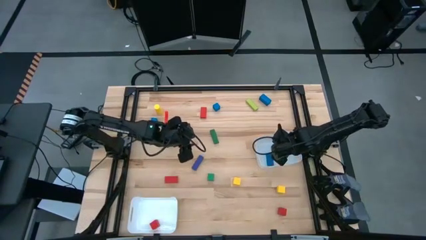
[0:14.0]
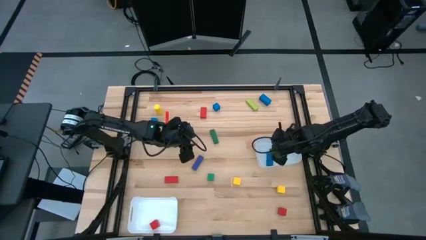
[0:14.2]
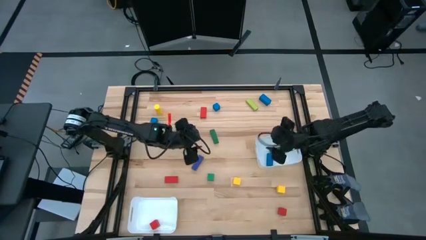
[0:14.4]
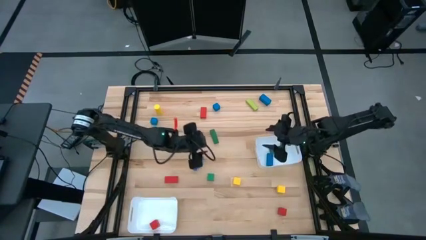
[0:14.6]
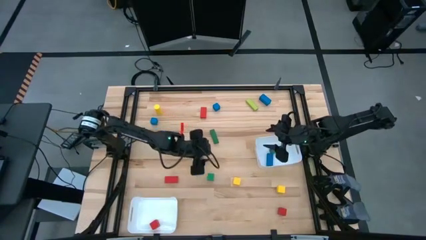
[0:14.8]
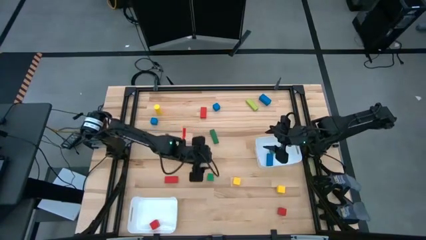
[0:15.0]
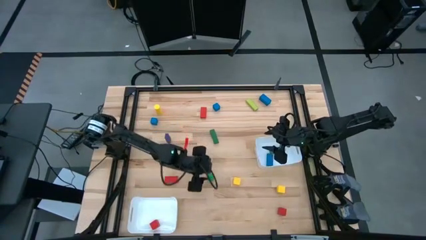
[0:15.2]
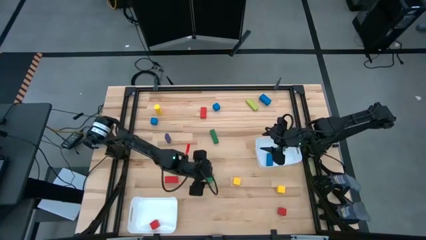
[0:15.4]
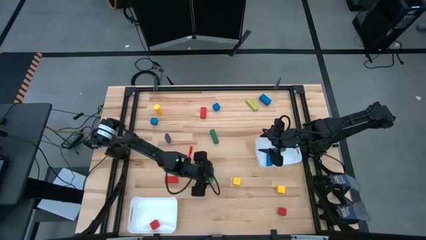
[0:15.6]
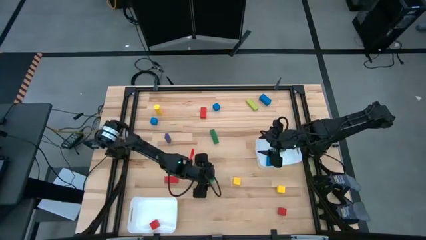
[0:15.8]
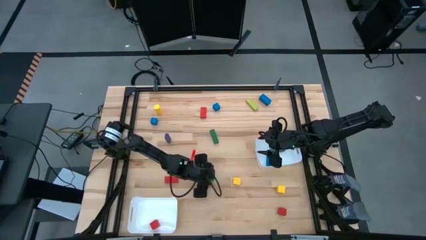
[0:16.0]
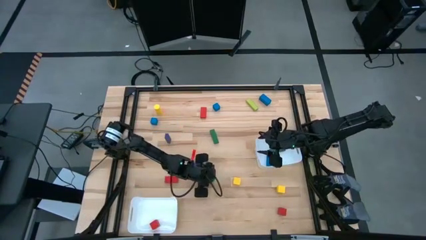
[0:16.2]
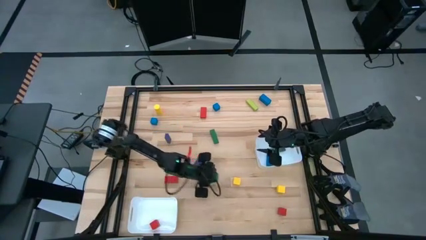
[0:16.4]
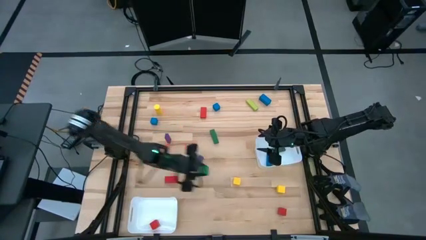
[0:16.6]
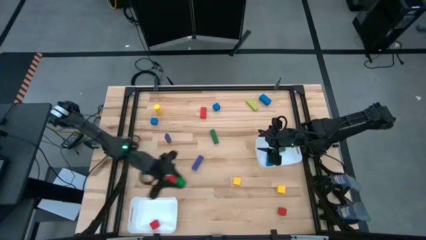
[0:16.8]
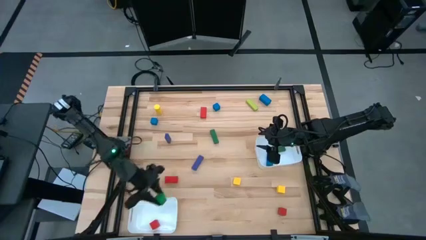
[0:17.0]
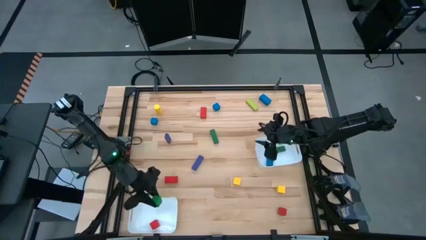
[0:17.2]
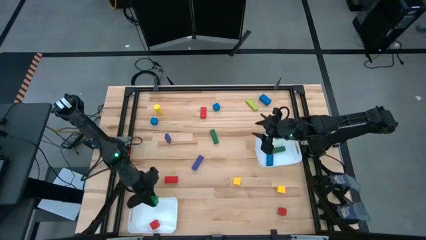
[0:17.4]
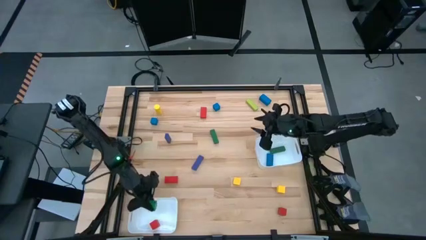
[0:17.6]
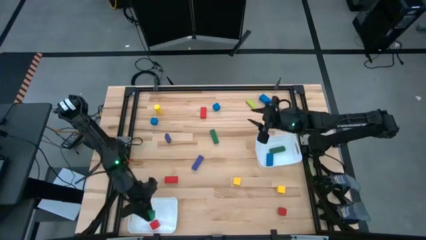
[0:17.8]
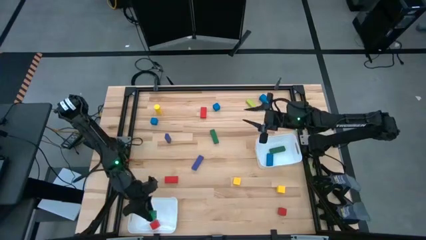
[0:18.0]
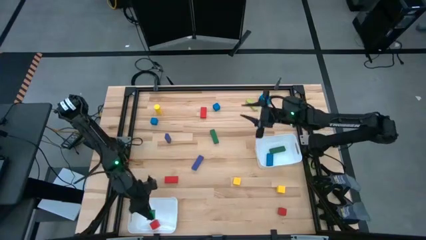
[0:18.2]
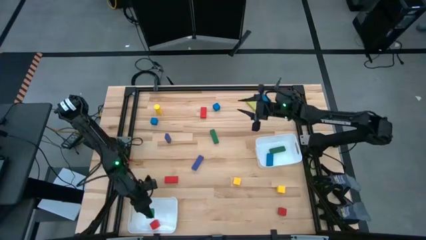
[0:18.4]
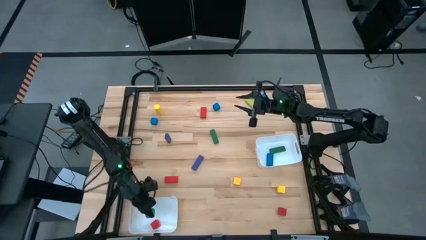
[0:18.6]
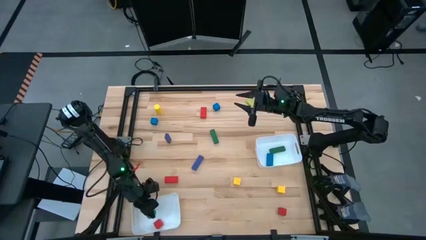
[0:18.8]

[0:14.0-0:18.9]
Task: Sort blocks by size
Put the green square block into the bottom white bin

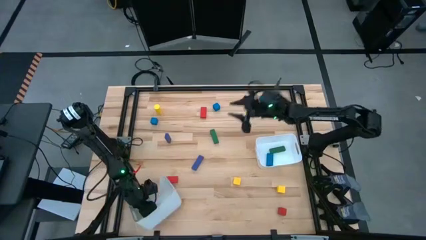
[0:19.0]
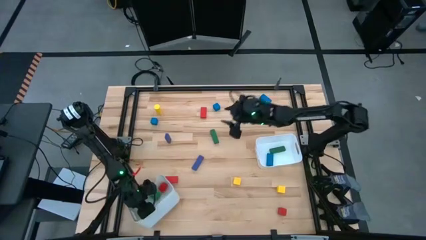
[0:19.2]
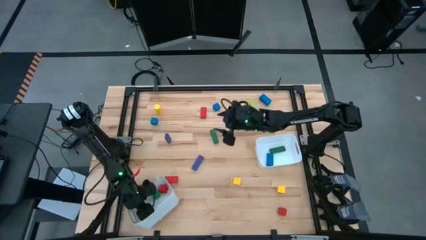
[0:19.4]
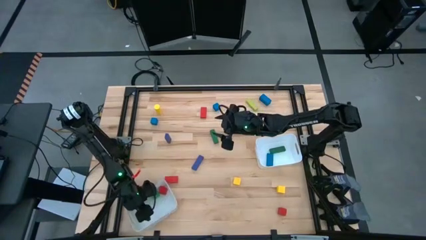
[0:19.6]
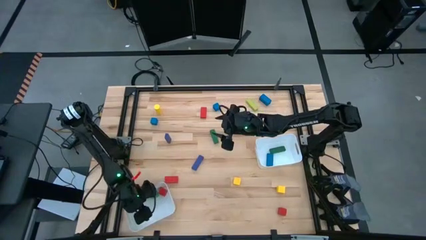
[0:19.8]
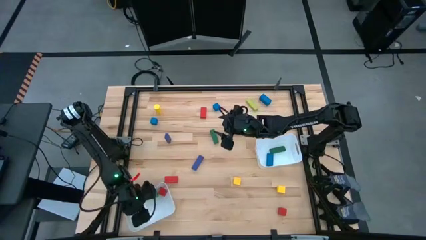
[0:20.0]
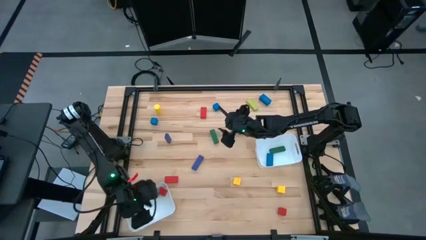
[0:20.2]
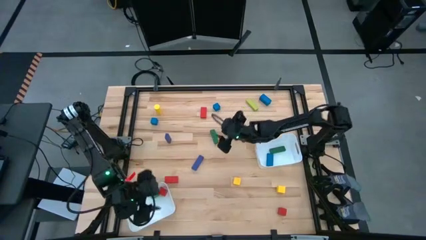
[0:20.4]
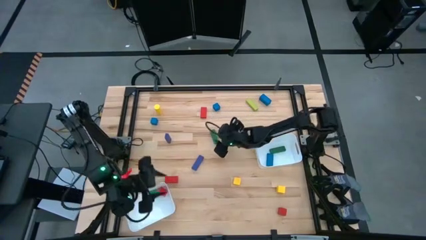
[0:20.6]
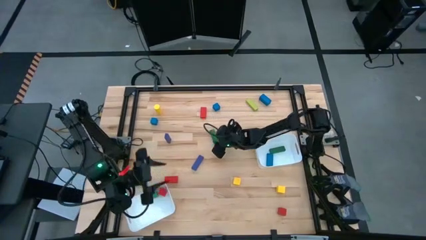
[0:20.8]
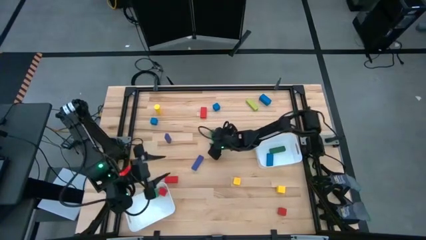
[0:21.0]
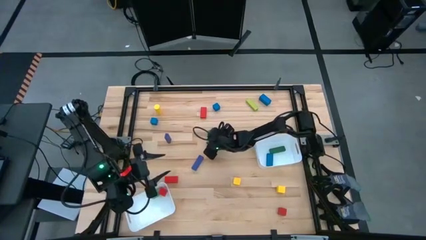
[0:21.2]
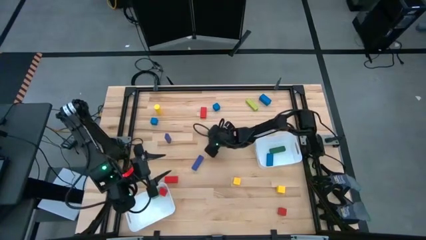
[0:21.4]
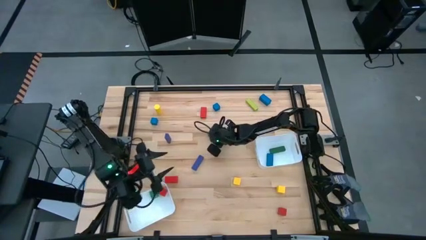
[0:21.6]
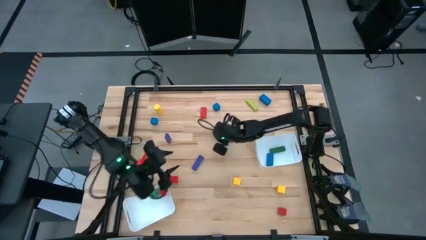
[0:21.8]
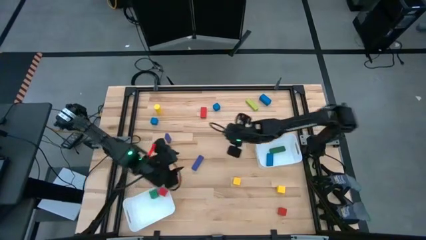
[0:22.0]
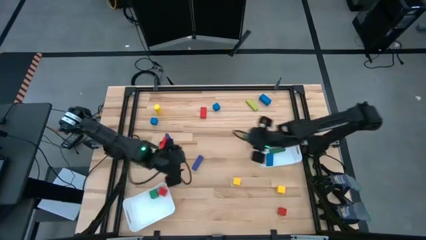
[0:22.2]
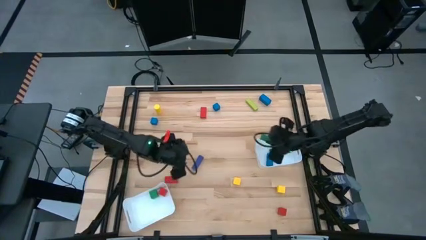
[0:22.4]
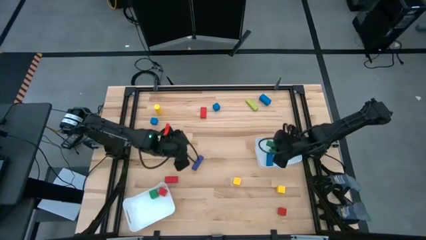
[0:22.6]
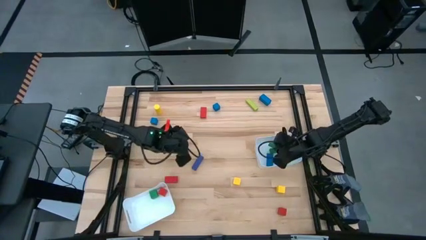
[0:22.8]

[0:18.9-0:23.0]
Put the green rectangular block into the top white bin

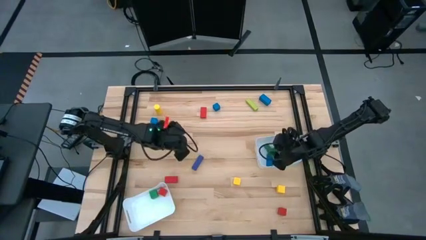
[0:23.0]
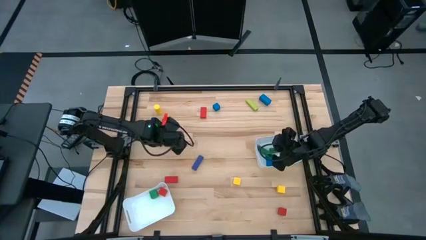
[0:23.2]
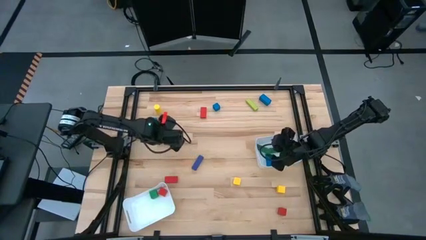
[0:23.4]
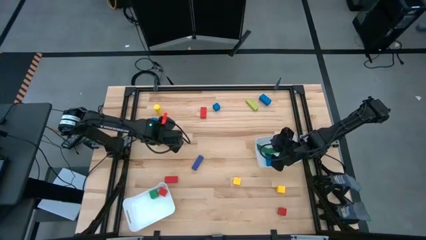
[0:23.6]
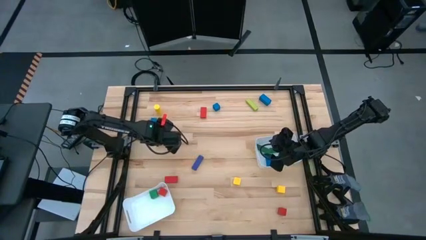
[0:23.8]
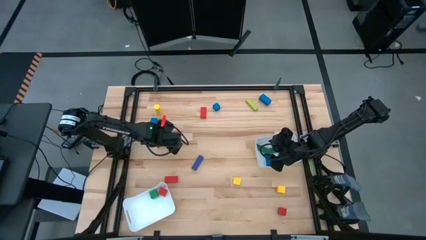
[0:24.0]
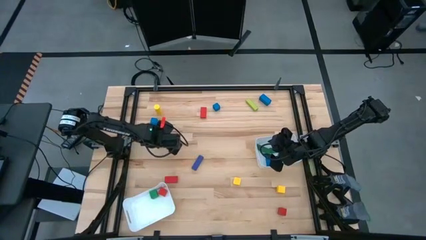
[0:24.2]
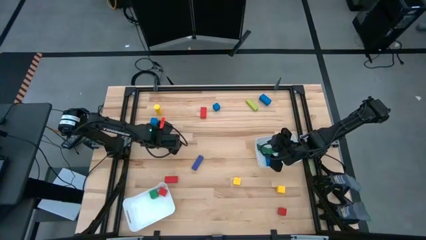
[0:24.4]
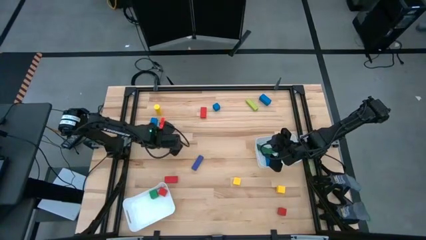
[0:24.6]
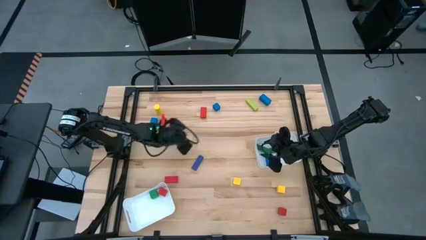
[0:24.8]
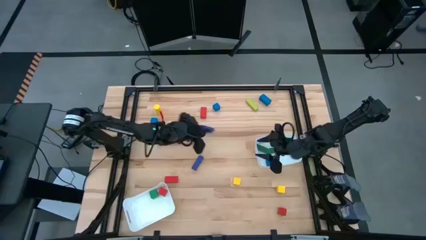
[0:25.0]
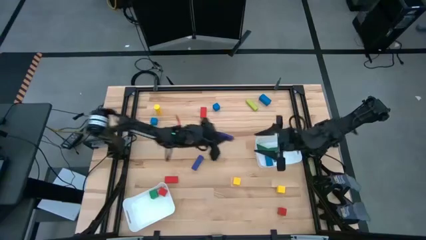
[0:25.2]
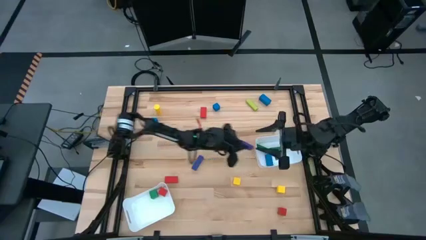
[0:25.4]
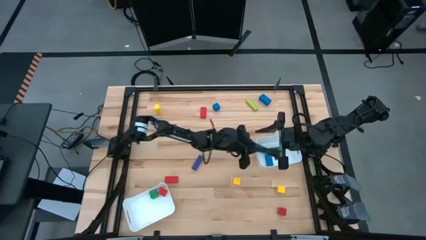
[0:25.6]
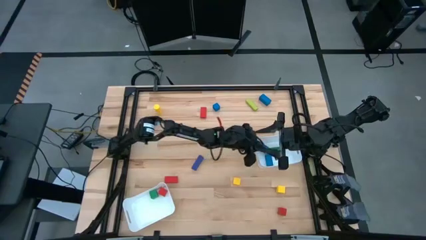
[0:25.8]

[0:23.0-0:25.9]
Put the blue rectangular block into the top white bin

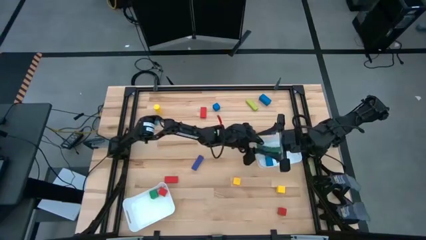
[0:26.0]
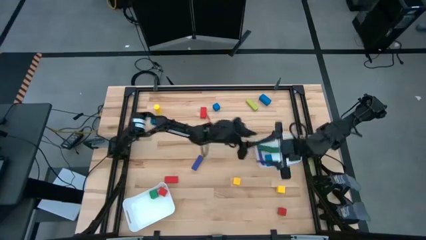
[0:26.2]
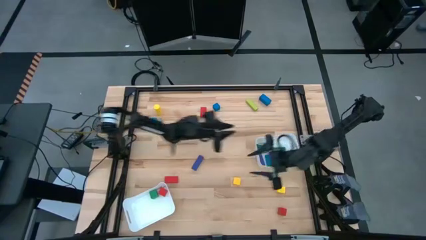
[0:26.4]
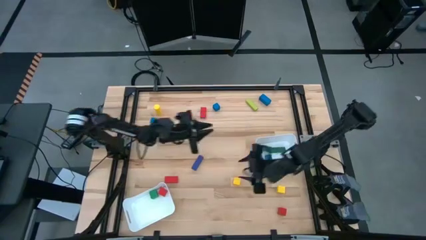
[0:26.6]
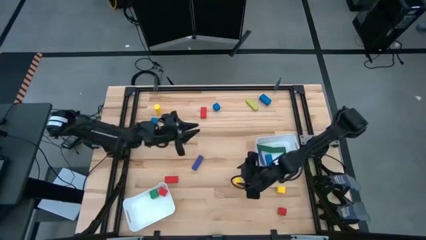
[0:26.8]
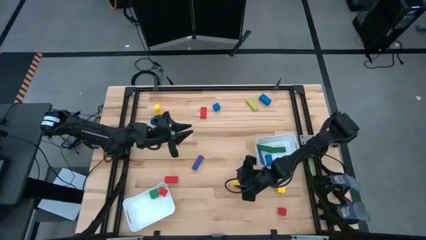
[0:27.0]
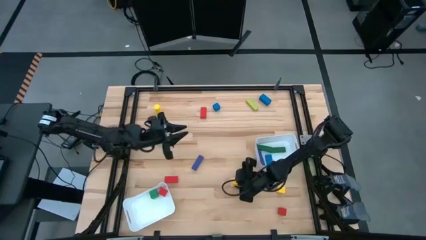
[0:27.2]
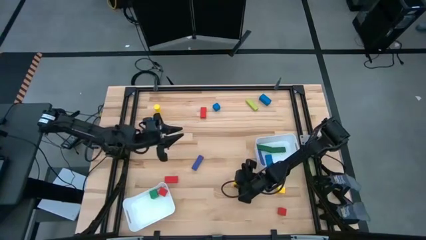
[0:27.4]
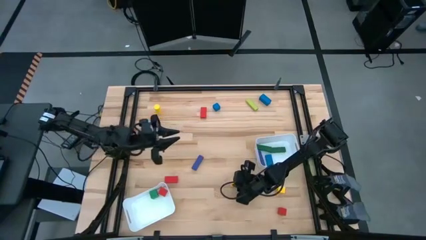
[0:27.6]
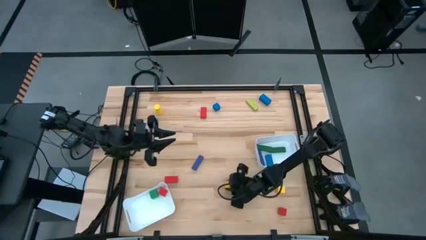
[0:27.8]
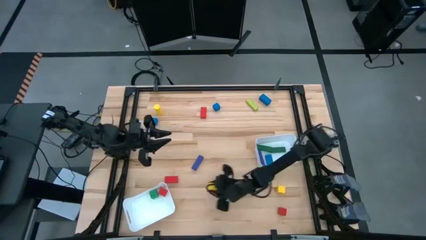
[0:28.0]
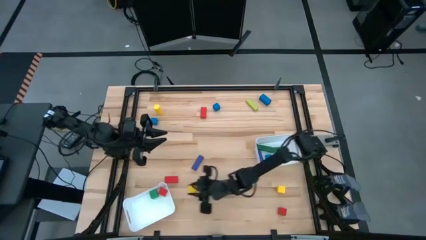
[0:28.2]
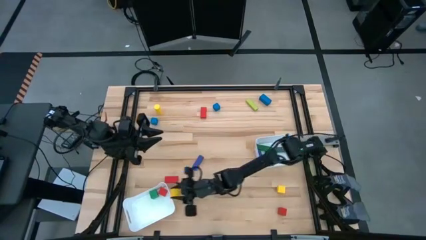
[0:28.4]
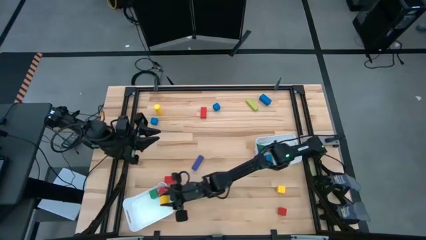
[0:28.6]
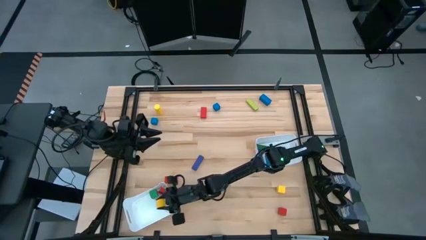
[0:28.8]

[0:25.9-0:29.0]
Put the yellow square block into the bottom white bin

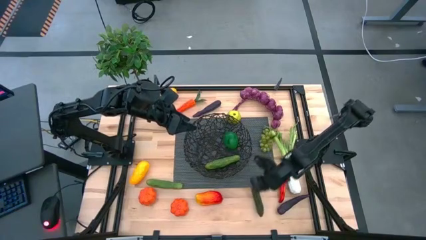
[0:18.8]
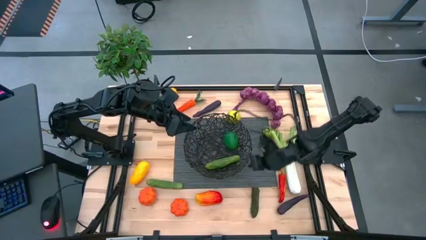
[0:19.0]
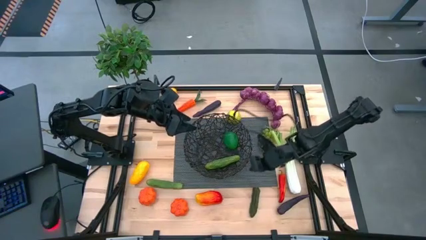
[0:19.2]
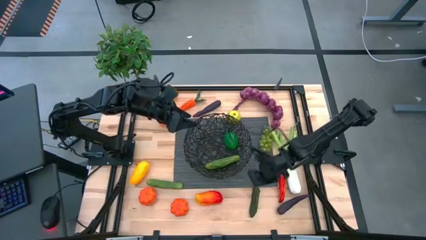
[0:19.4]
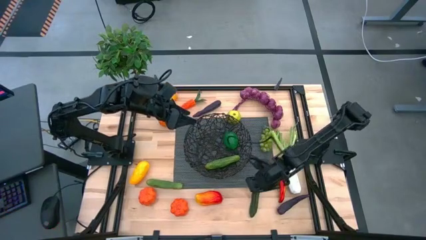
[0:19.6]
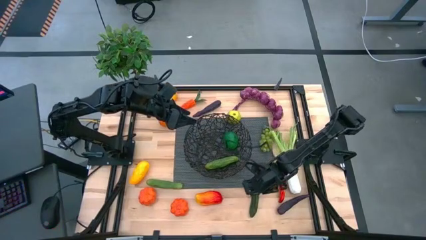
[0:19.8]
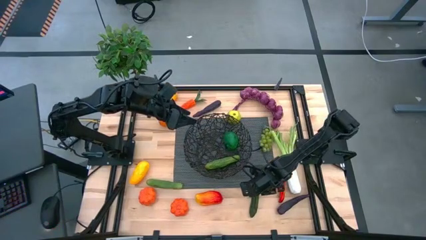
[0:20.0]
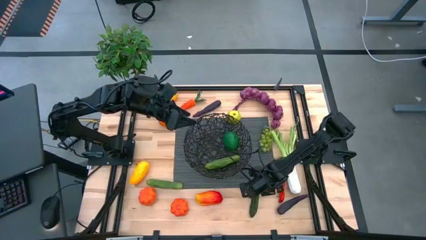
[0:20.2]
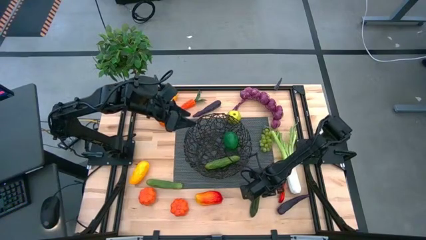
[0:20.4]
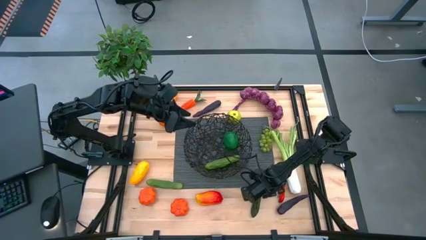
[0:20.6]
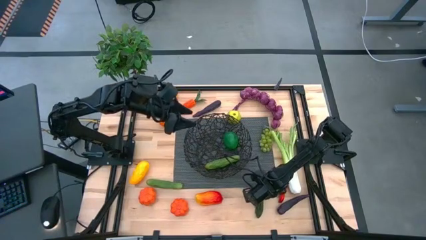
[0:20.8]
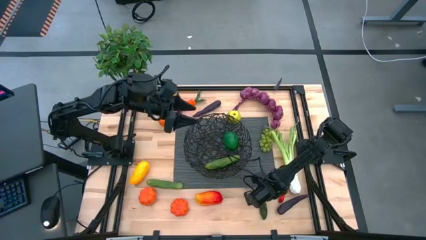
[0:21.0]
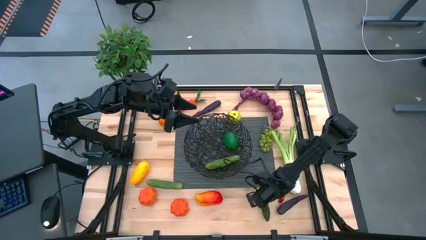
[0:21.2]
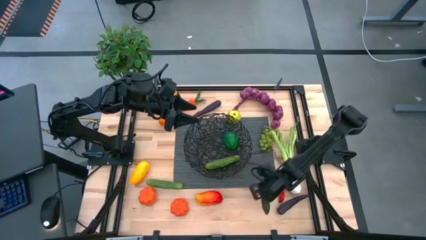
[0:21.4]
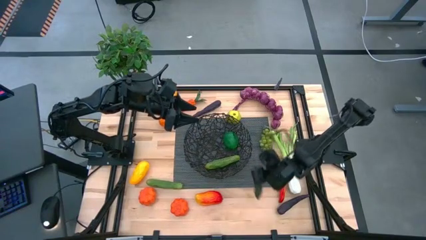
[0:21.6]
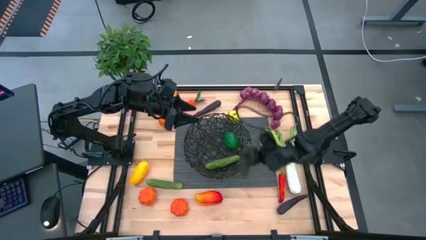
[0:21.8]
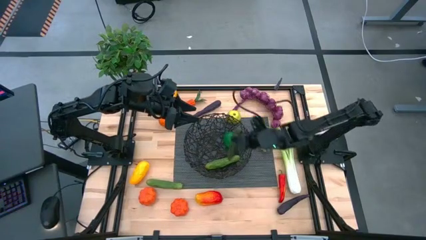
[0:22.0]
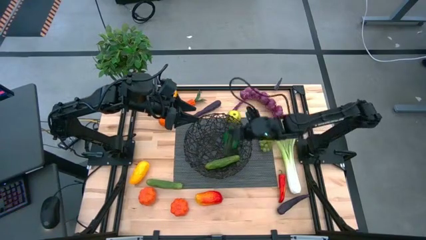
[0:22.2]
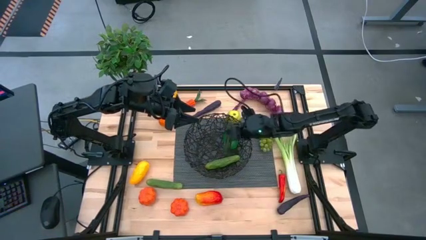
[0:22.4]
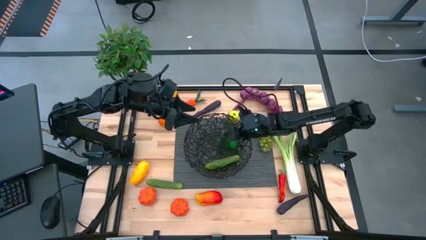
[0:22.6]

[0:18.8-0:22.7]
Task: Build produce basket
Put the green chili pepper into the black basket
